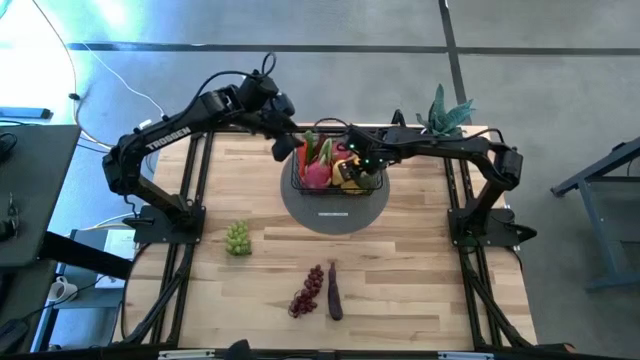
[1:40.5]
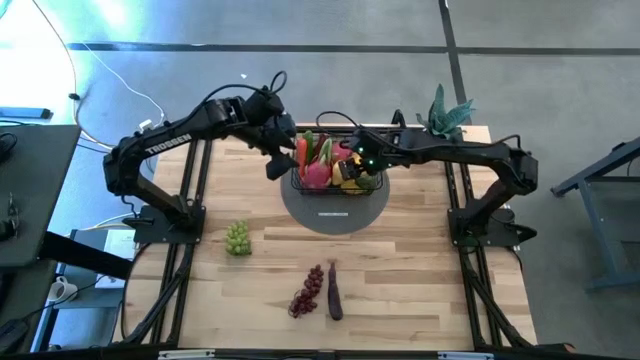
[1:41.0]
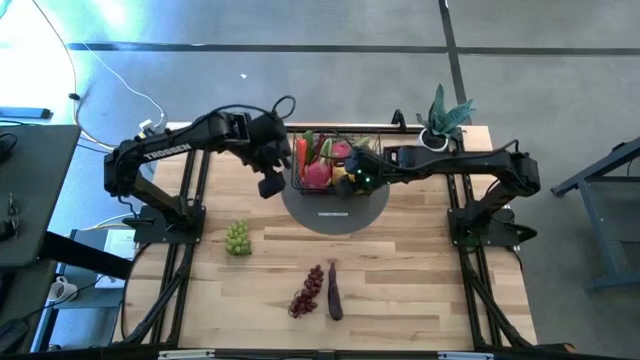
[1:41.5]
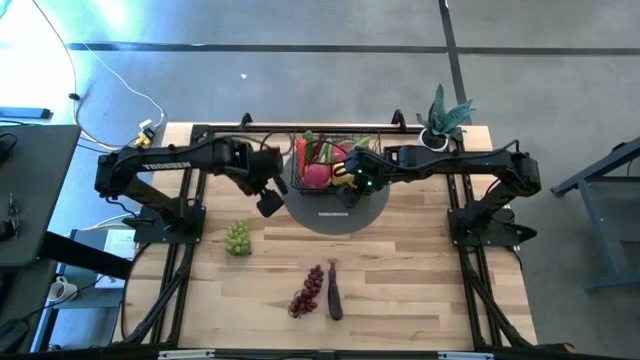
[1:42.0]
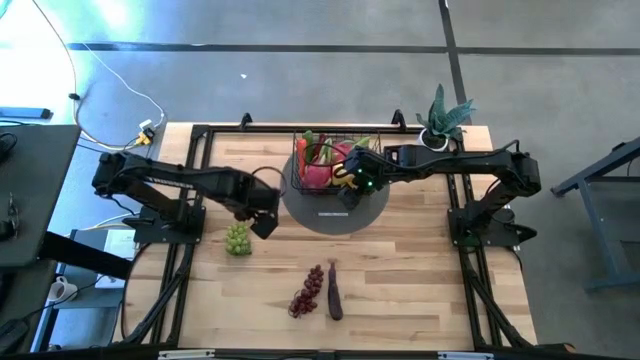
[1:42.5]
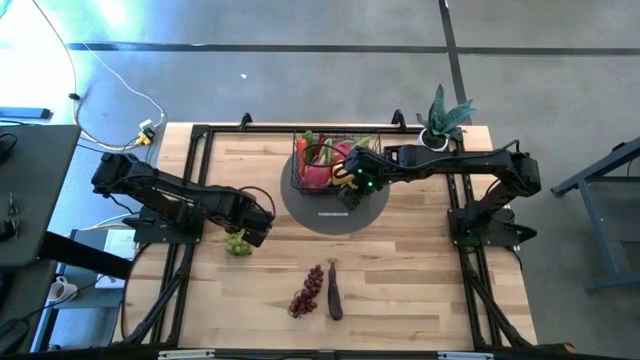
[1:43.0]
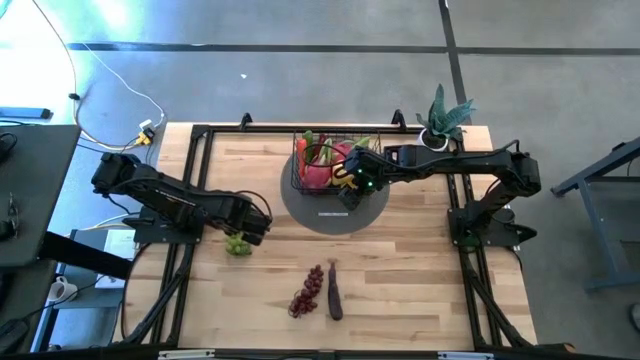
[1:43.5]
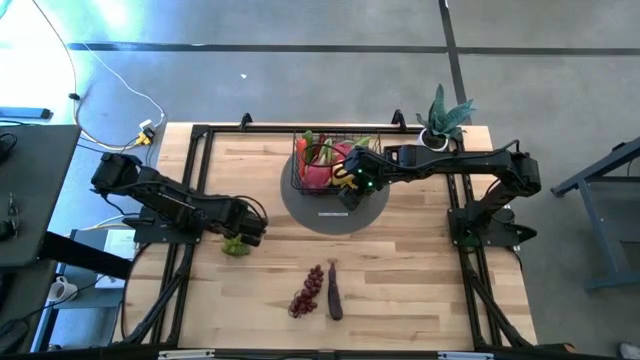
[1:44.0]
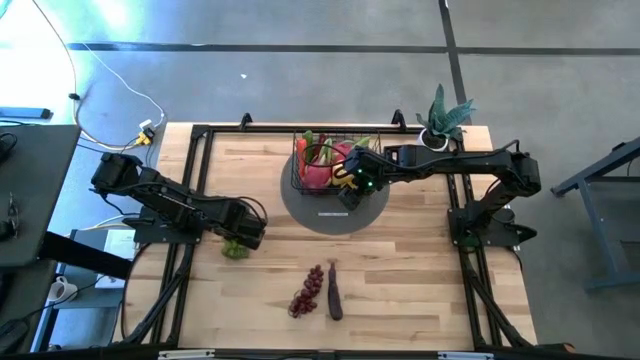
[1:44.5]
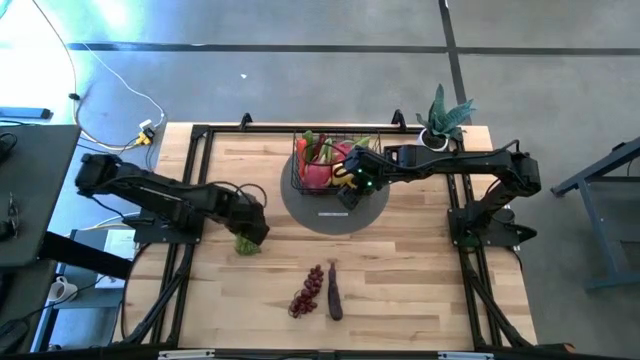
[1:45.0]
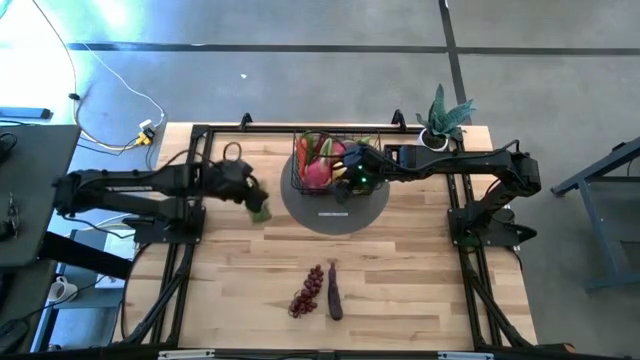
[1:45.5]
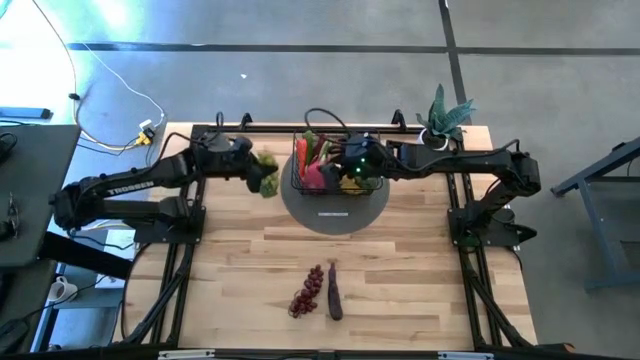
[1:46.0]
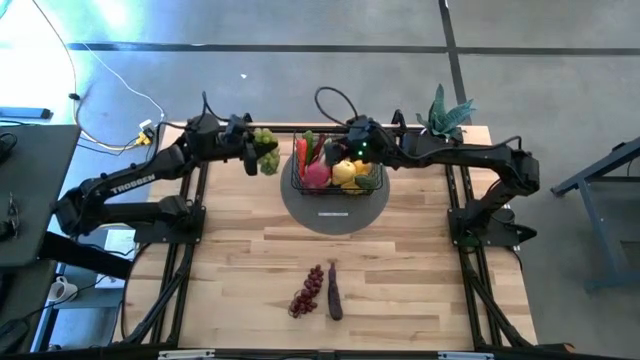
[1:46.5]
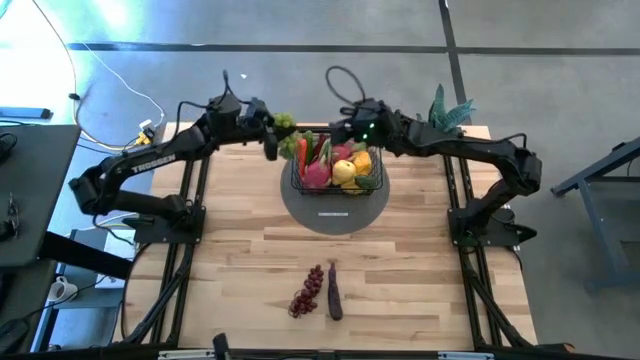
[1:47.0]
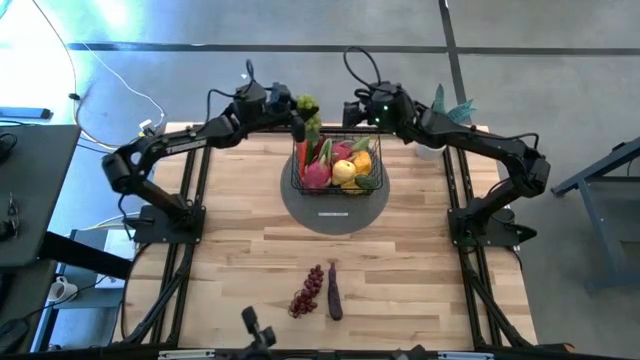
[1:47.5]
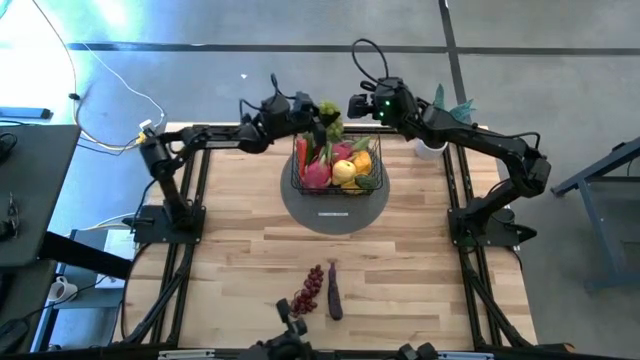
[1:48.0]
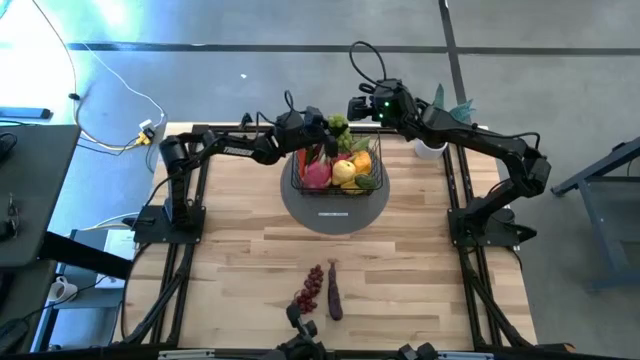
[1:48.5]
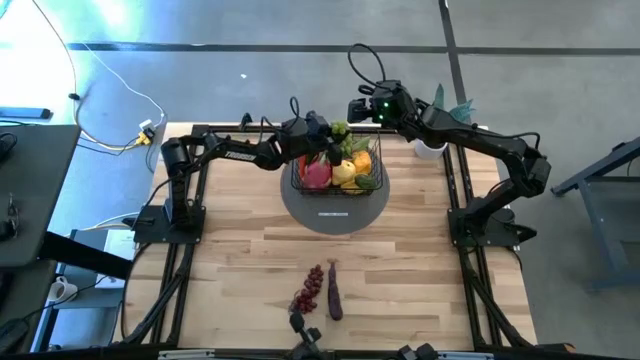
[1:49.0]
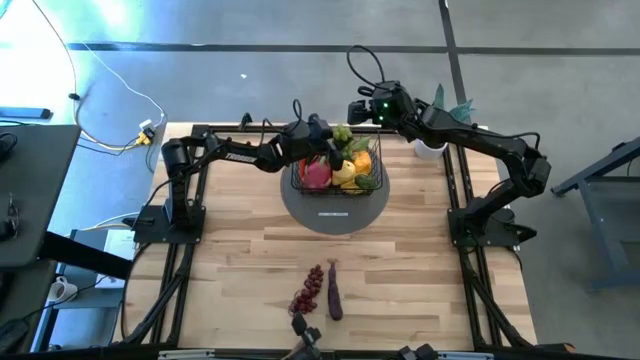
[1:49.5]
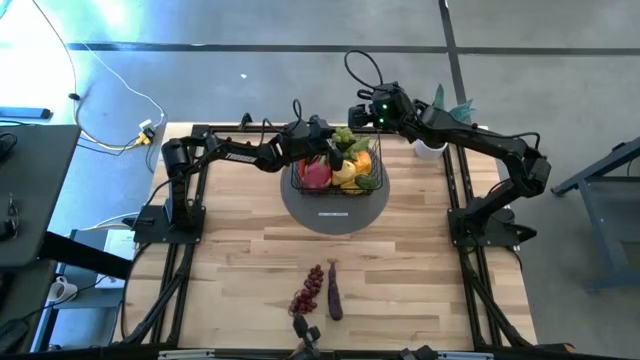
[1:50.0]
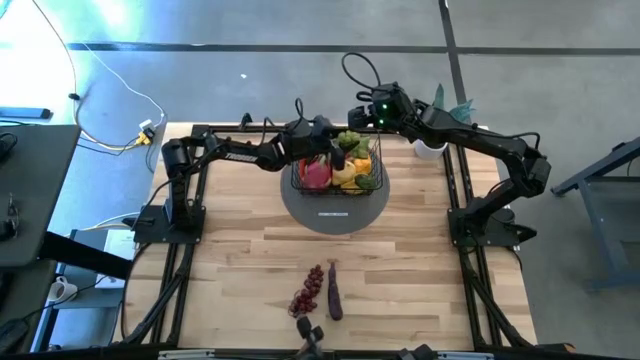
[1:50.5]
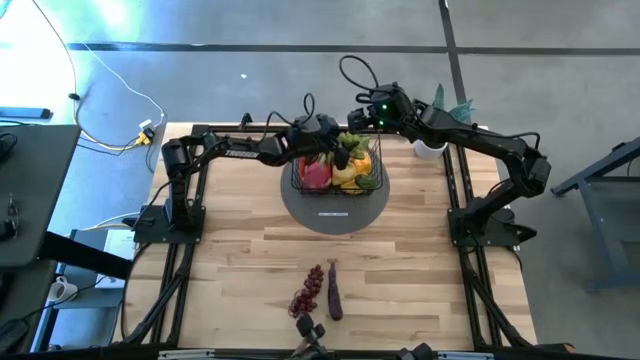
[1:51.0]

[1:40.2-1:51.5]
Task: Build produce basket
Put the green grapes into the wire basket

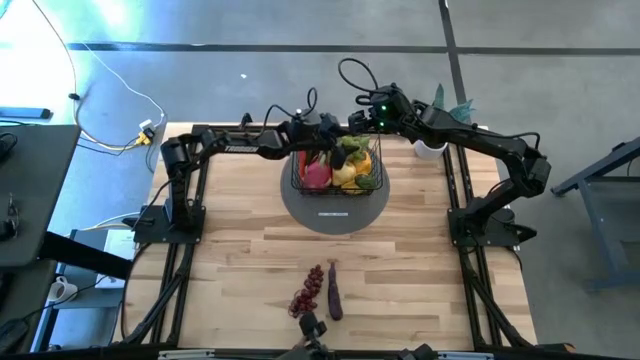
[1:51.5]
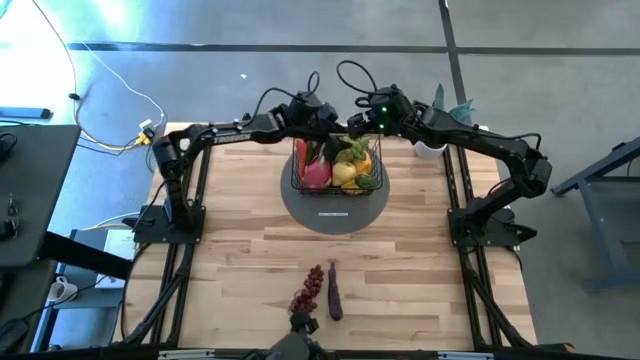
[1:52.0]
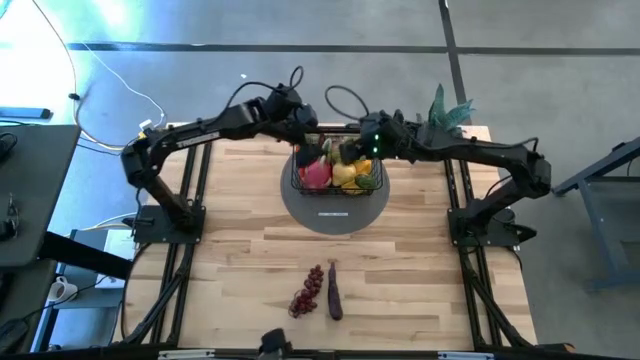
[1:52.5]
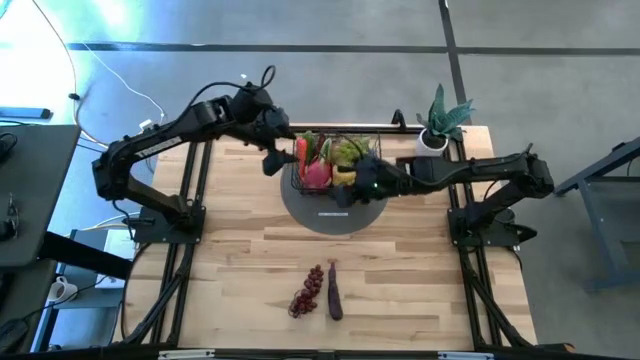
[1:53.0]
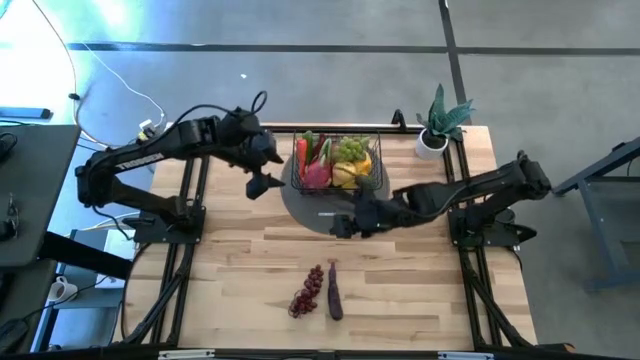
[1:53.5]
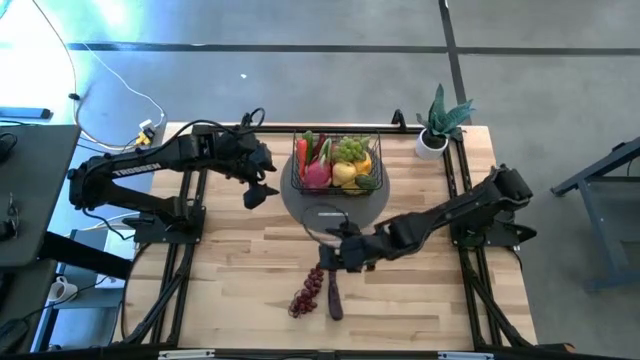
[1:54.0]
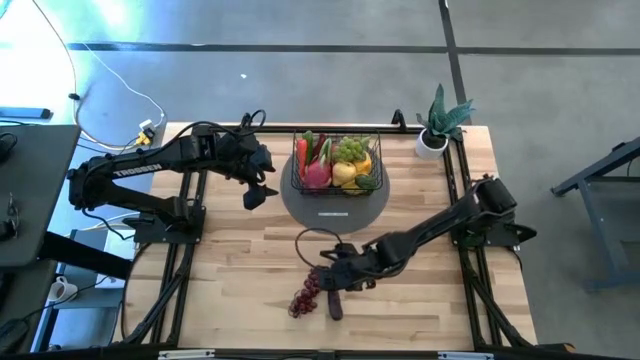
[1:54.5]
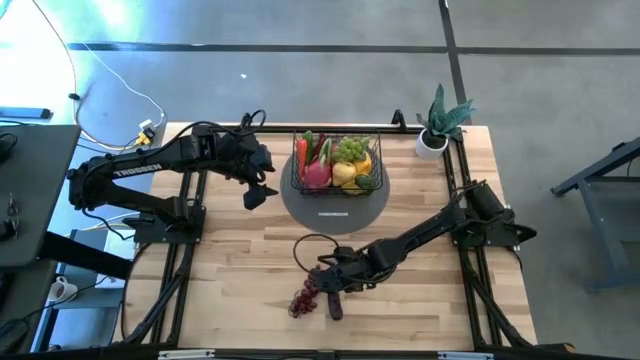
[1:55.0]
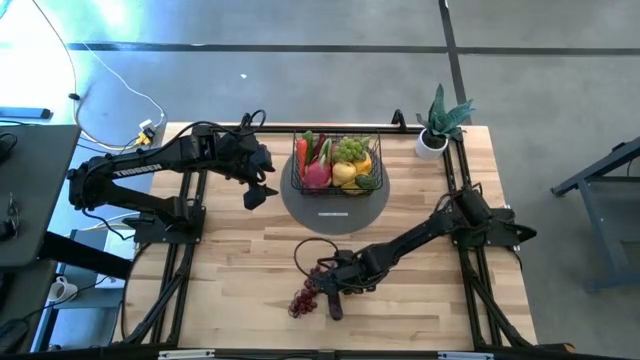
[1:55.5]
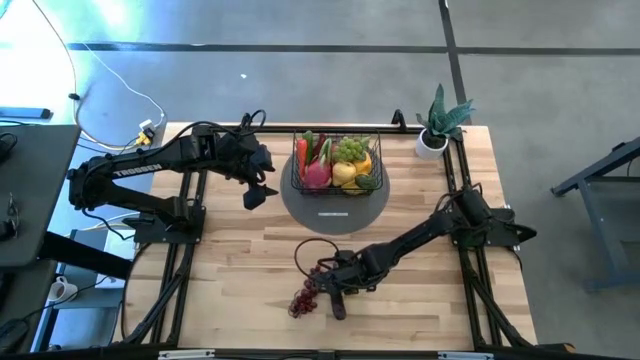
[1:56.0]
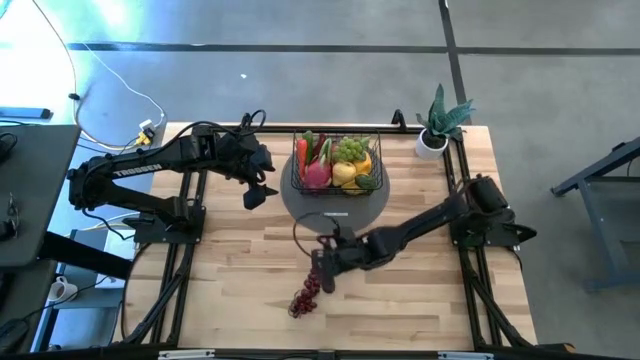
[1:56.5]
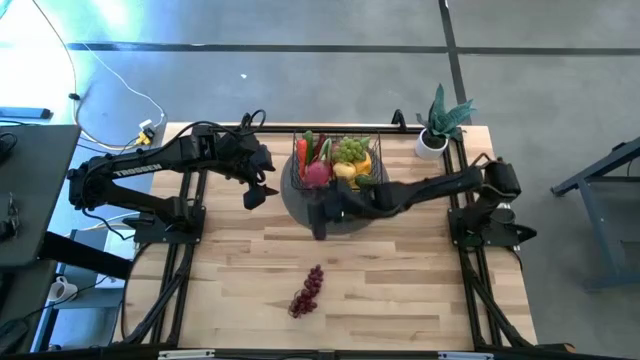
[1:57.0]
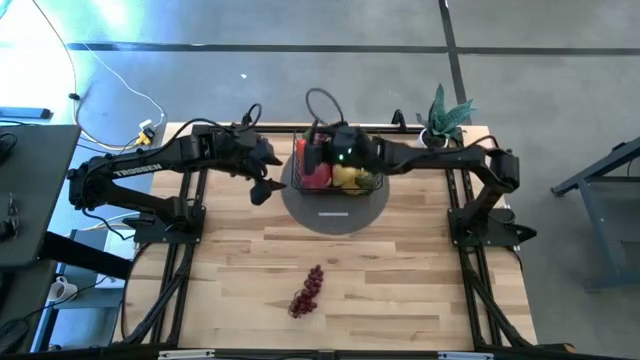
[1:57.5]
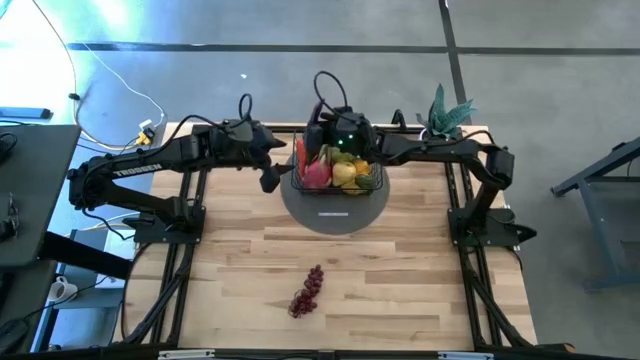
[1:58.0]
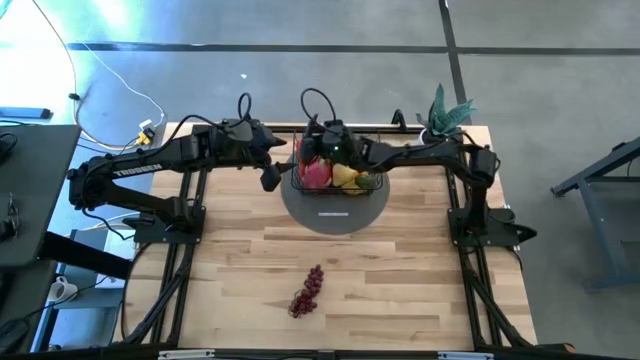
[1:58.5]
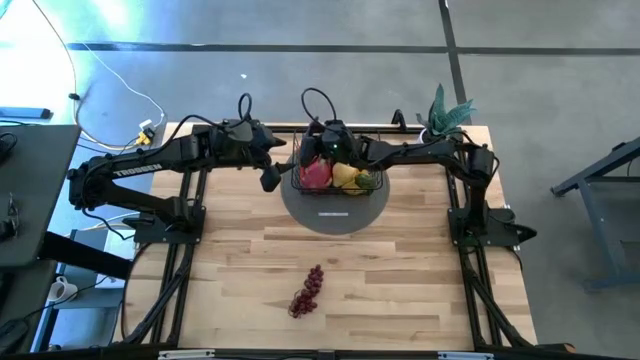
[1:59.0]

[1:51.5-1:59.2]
Put the eggplant into the wire basket

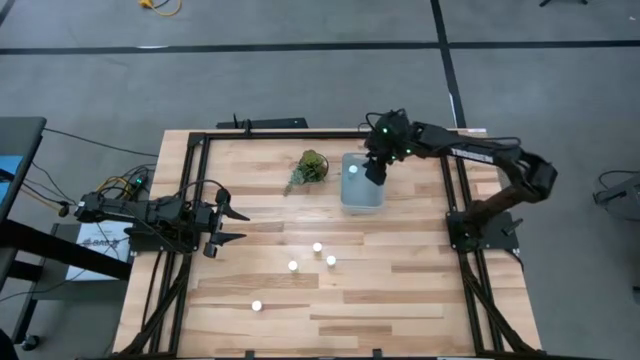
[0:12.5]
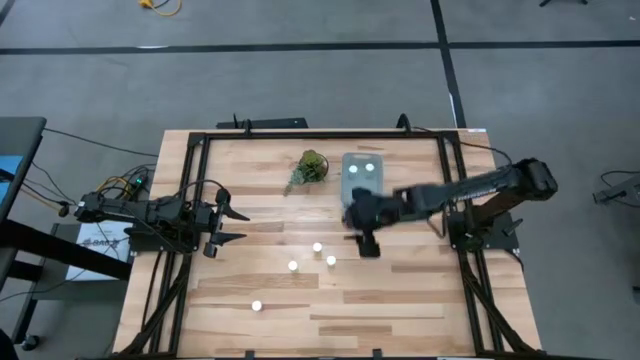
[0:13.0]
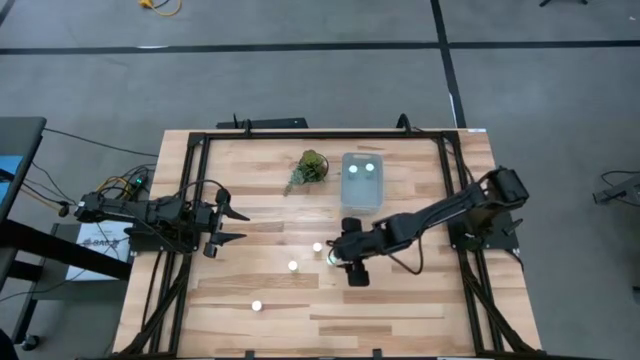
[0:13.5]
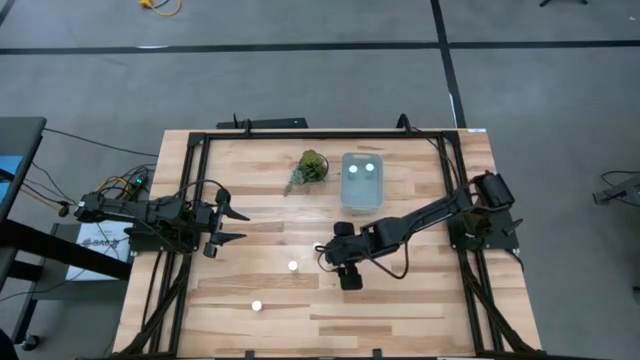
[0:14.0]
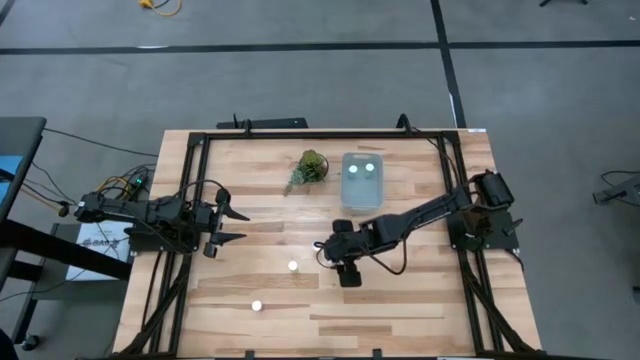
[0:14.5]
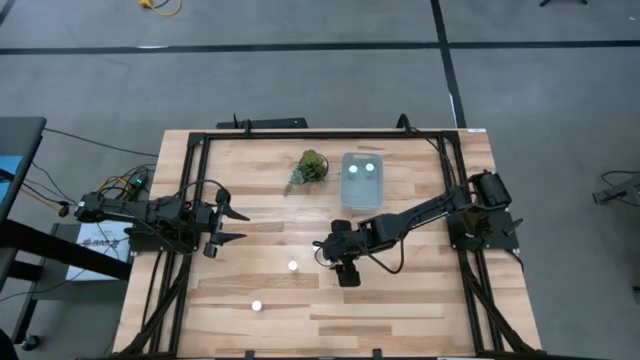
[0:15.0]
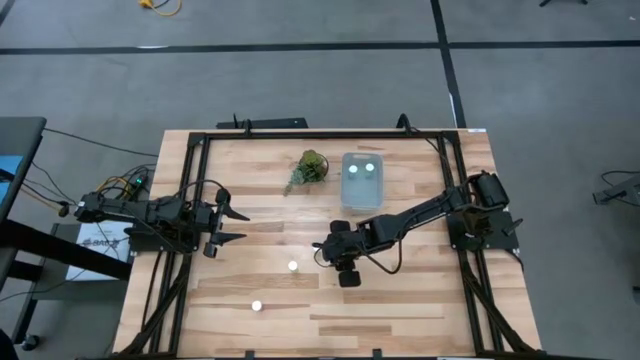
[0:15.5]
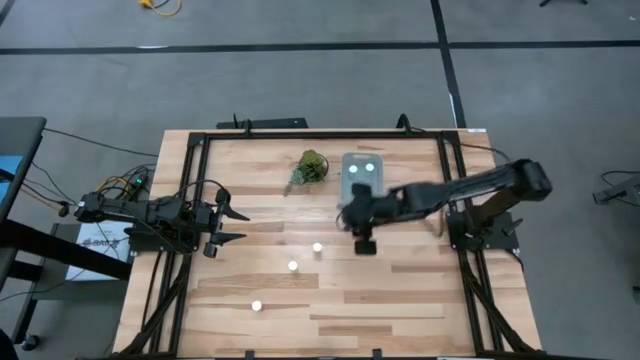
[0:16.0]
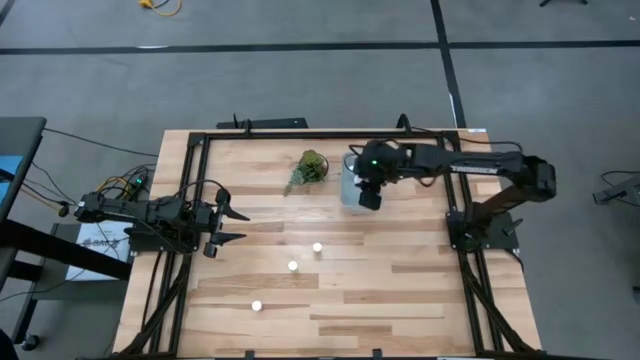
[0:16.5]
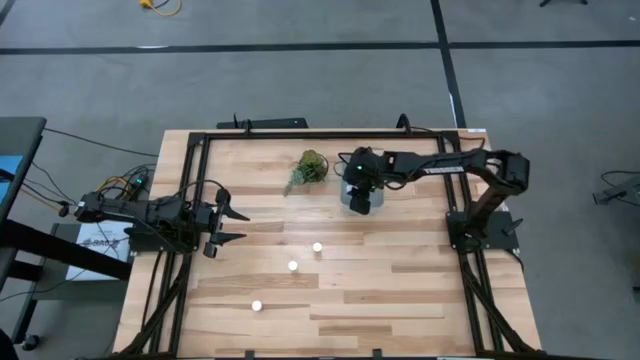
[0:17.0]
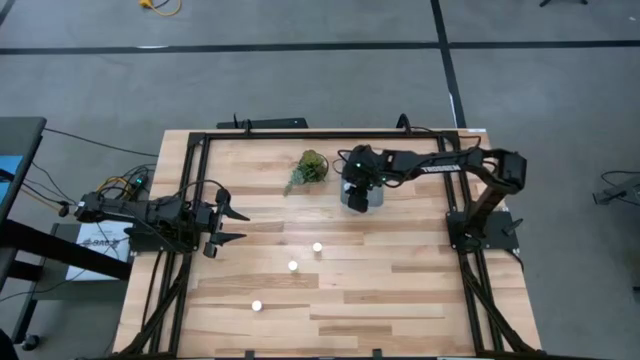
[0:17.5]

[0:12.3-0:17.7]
Task: Pick and place pill bottles into a basket
Put the middle yellow pill bottle into the gray bin
